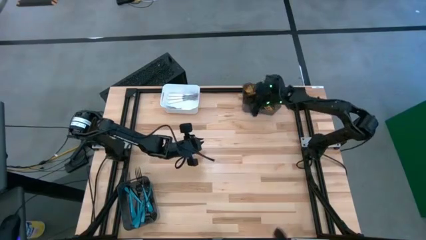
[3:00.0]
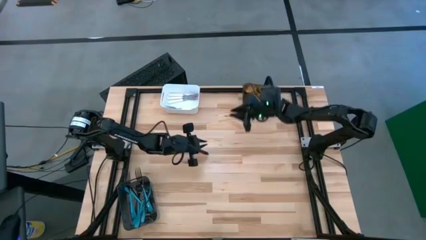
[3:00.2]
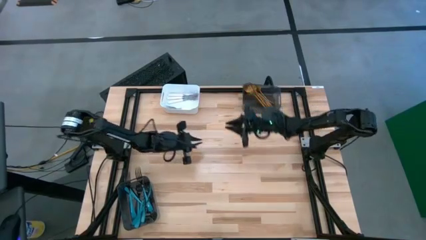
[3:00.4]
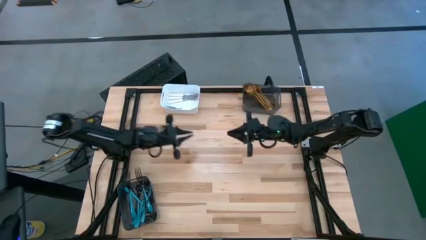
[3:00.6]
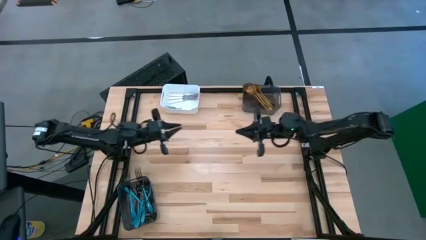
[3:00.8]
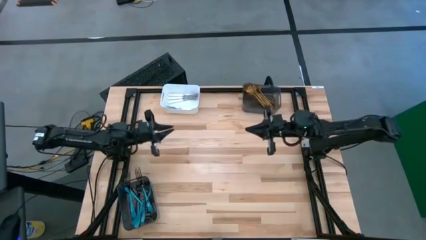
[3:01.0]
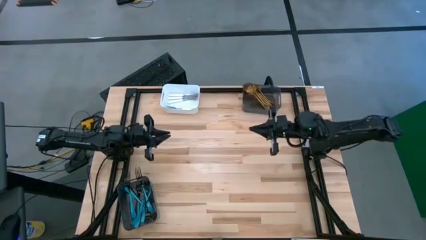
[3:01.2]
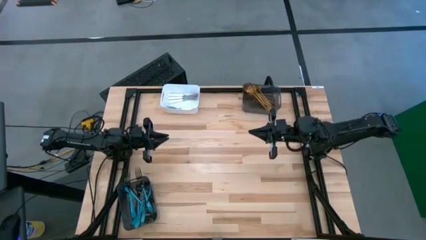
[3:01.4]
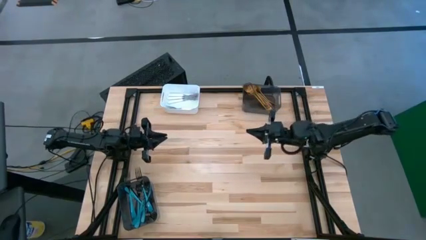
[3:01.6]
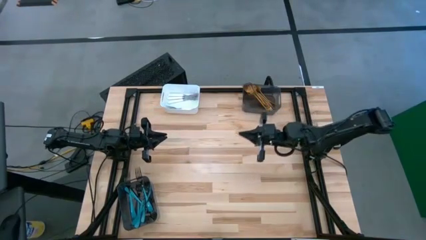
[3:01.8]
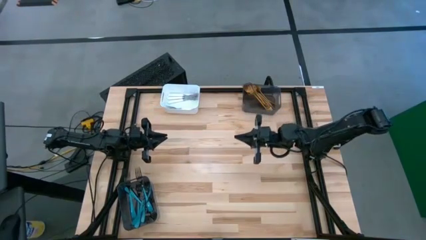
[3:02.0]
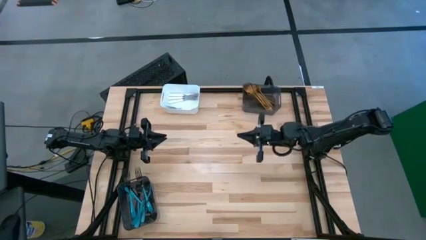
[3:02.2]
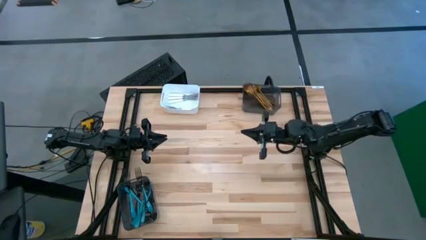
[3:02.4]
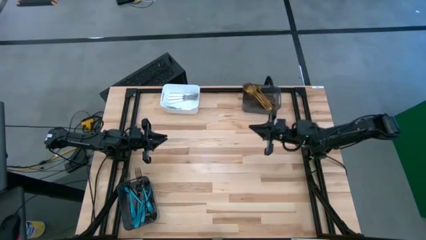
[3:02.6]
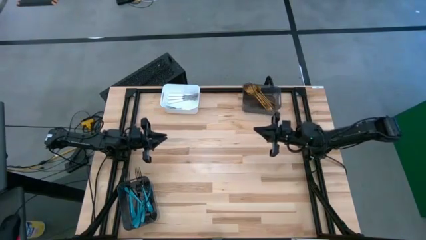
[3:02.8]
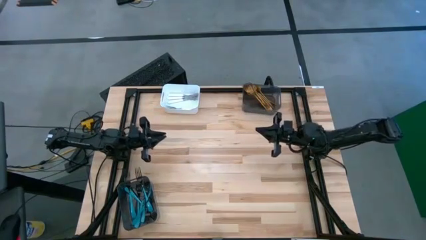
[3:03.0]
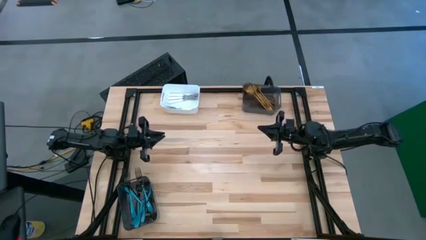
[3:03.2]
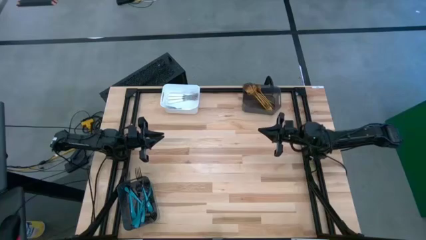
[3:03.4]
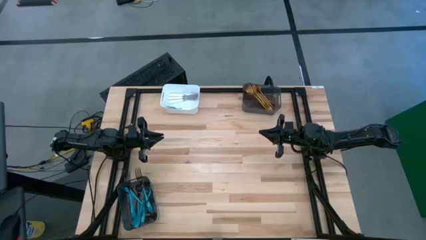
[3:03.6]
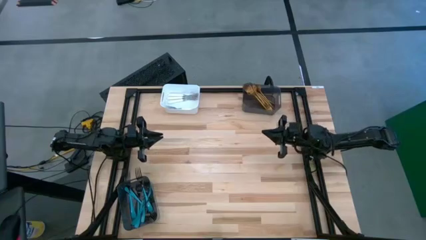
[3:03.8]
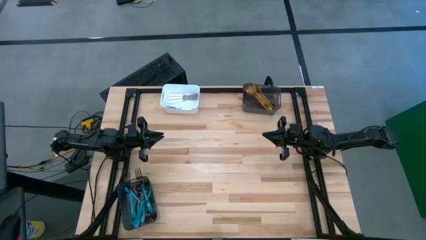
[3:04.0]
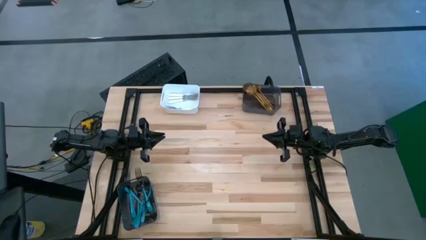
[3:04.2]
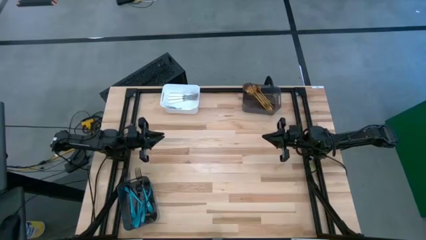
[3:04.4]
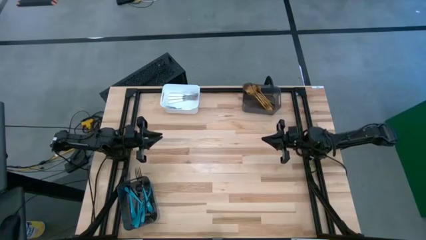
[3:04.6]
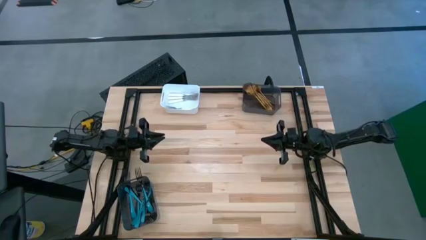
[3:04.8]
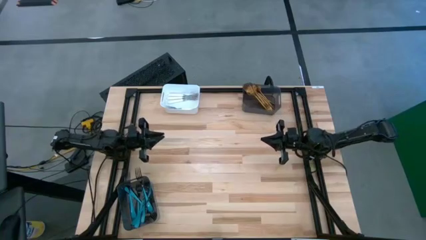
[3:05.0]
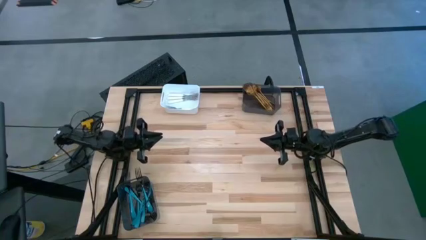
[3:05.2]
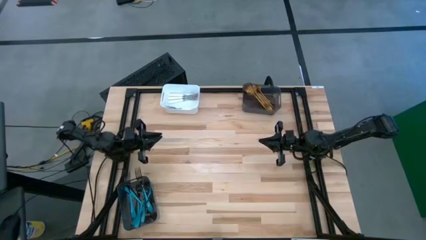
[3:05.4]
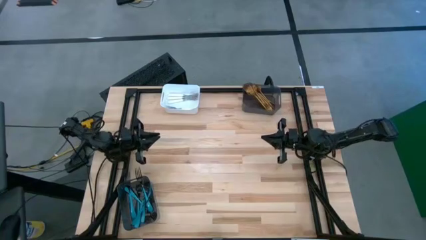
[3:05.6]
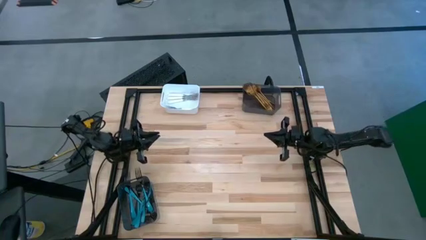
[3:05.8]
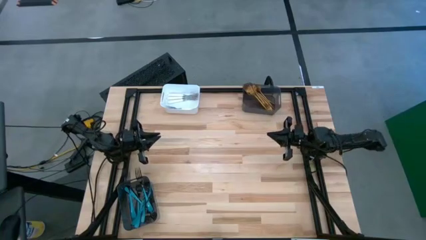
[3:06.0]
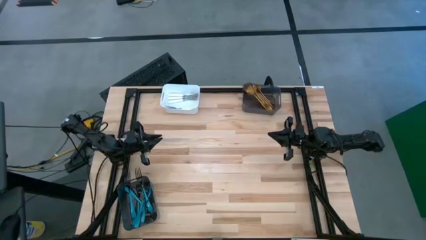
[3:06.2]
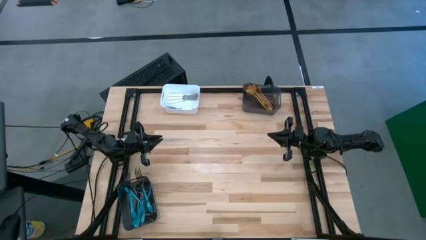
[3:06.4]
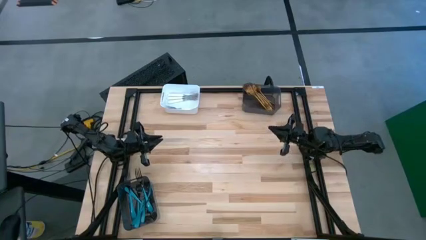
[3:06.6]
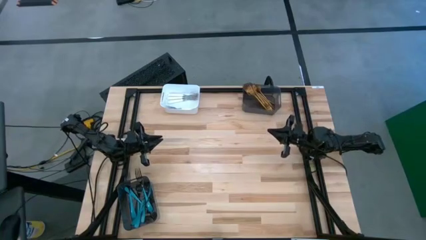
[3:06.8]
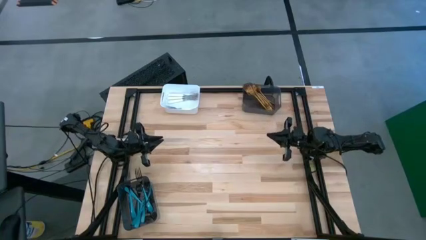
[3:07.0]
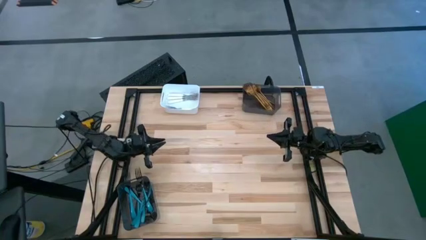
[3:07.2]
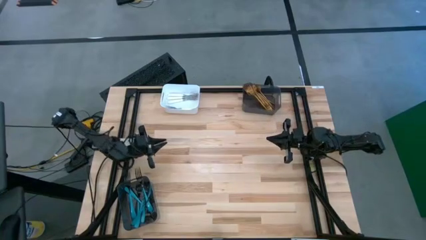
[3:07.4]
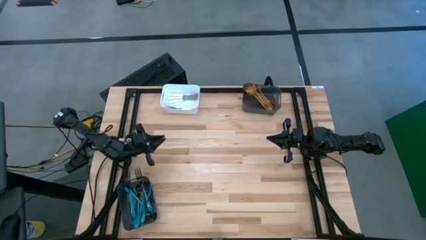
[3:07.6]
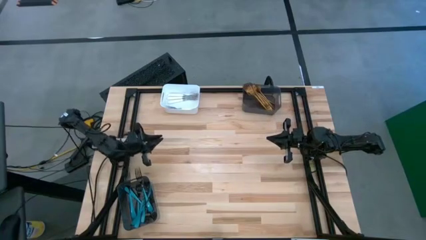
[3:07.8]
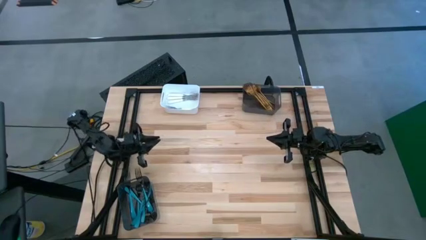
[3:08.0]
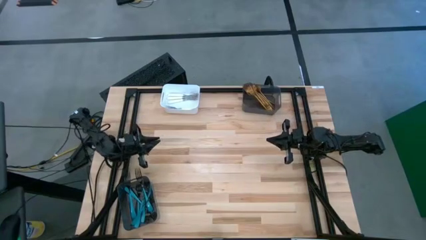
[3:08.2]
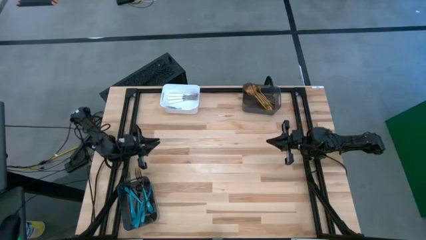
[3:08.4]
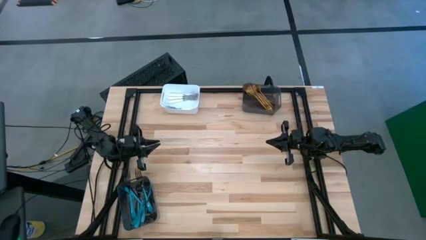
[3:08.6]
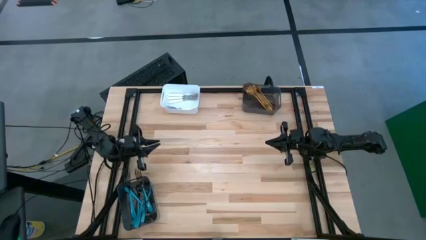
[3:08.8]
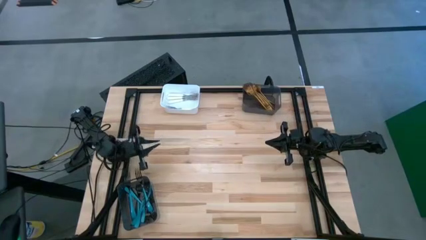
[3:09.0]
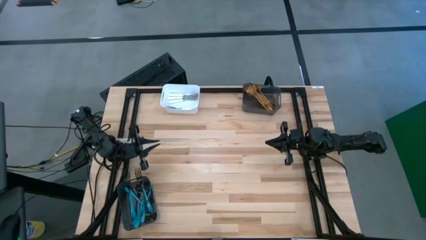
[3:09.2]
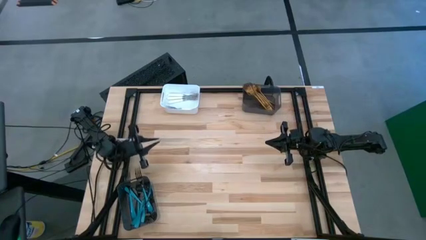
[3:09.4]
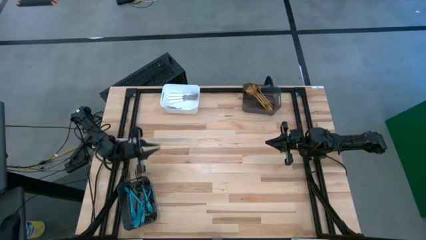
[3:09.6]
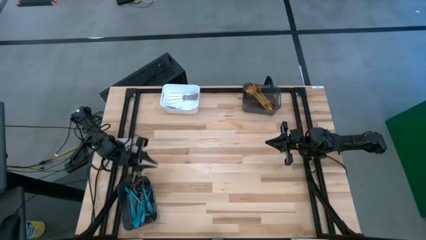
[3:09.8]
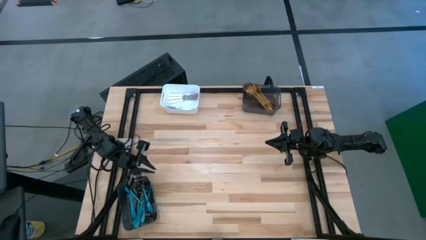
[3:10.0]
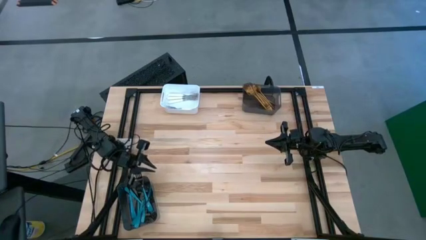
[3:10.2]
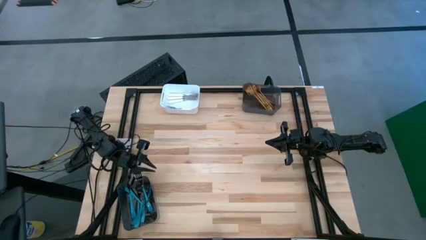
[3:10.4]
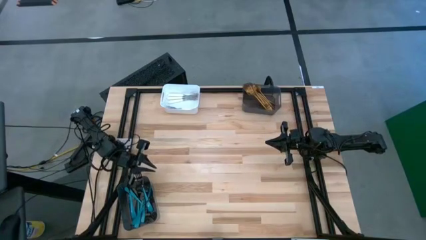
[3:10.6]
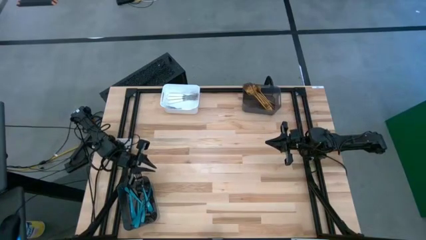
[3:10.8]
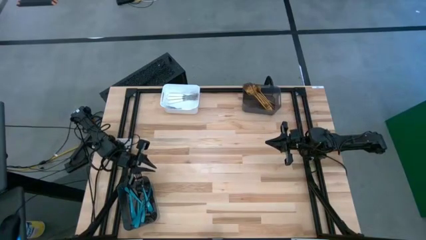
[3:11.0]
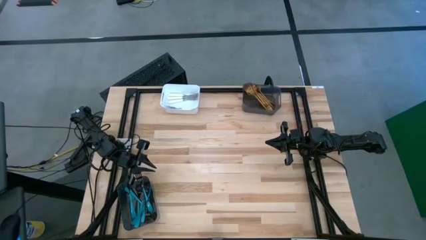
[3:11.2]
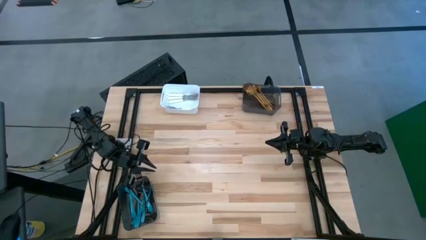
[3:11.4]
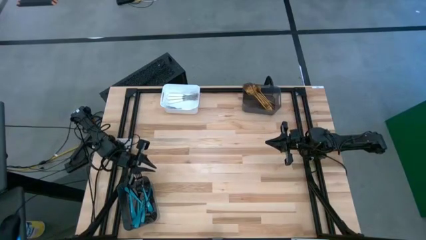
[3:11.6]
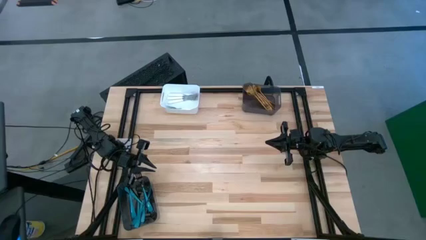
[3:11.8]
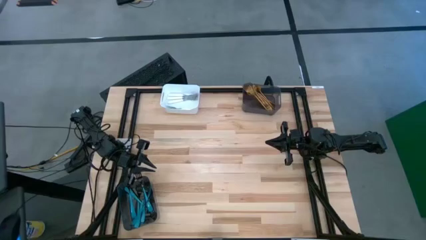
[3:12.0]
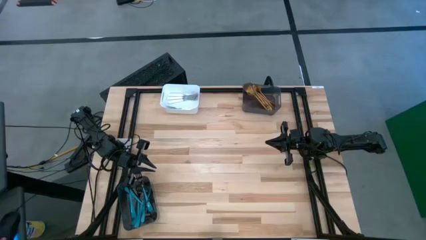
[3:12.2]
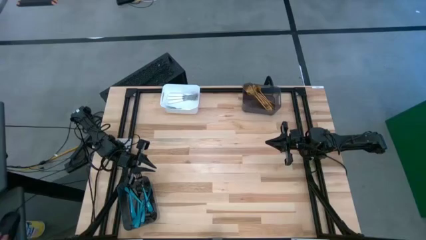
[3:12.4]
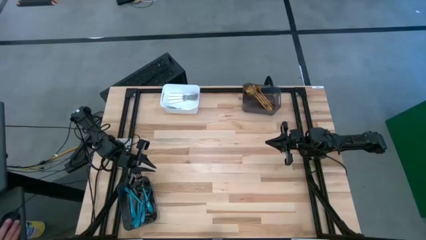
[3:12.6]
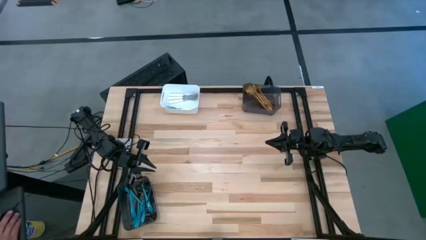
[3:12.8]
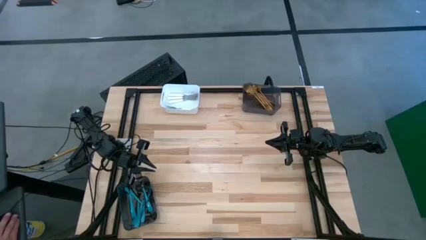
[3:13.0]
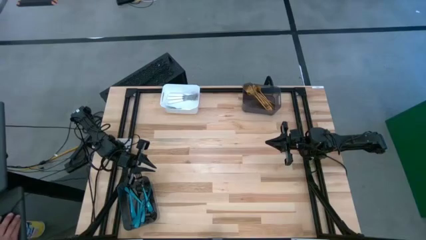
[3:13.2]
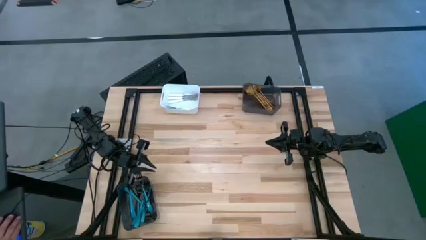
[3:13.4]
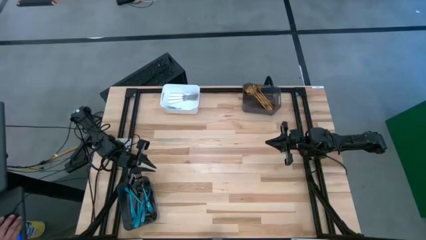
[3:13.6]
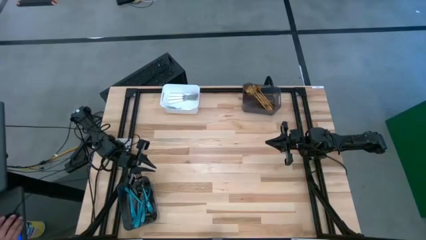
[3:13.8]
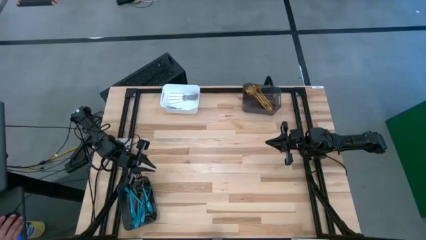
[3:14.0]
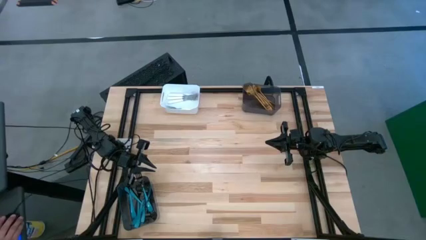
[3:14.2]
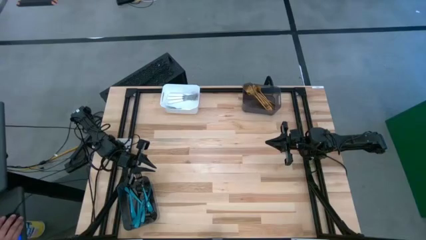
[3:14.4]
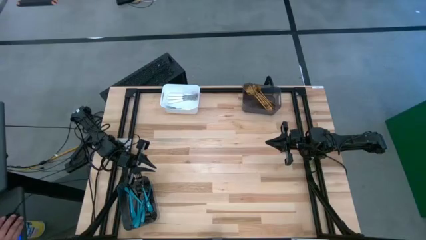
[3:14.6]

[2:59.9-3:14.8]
Task: Sort silverware by color (type)
Return to Home Position

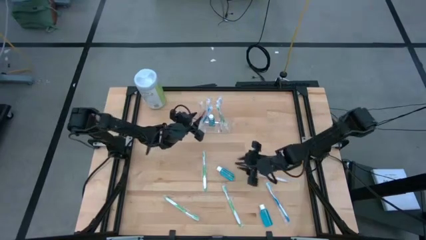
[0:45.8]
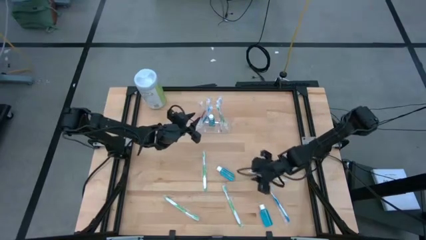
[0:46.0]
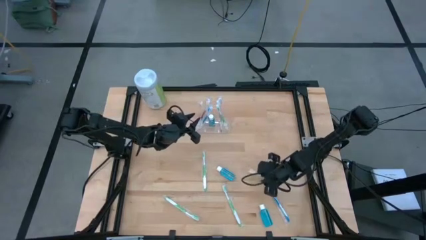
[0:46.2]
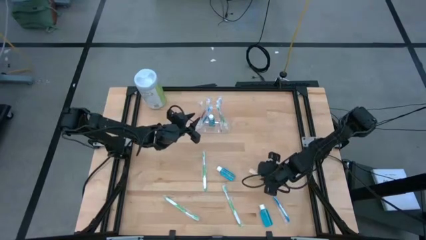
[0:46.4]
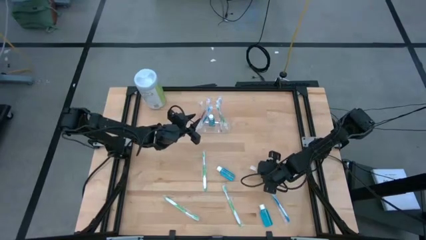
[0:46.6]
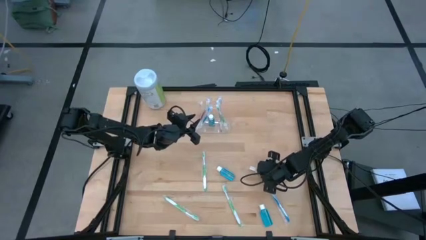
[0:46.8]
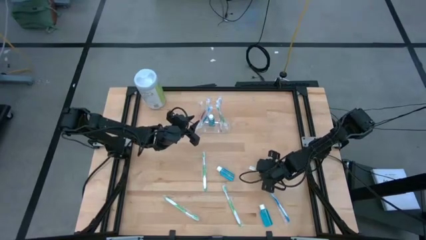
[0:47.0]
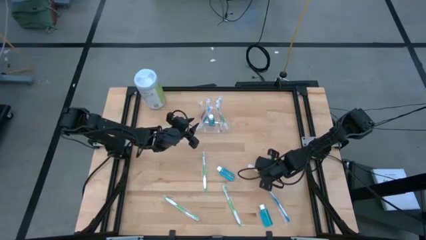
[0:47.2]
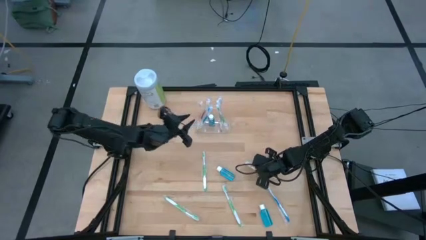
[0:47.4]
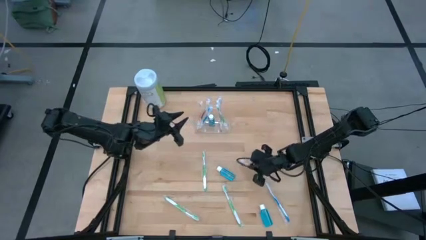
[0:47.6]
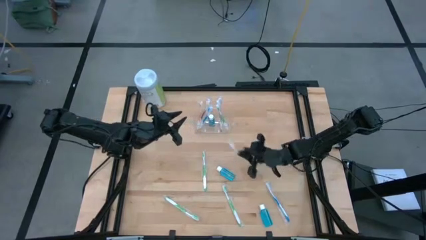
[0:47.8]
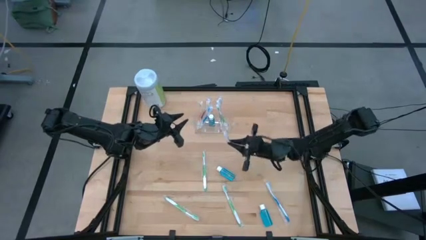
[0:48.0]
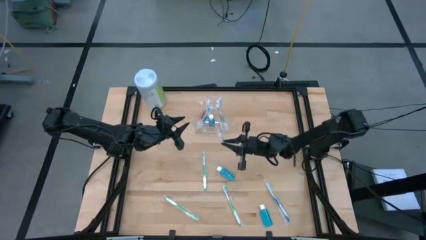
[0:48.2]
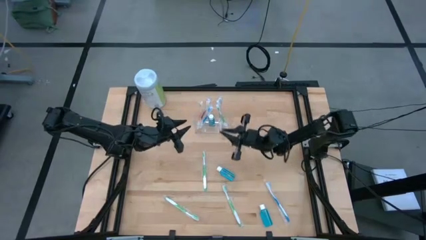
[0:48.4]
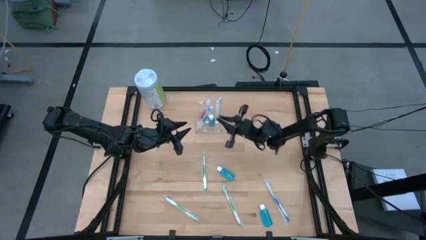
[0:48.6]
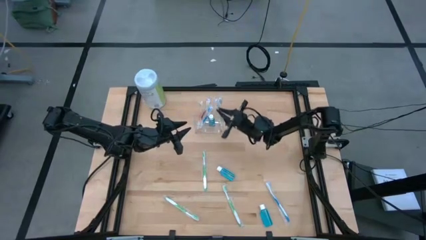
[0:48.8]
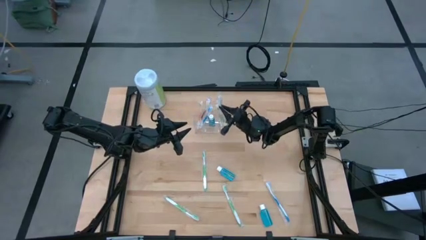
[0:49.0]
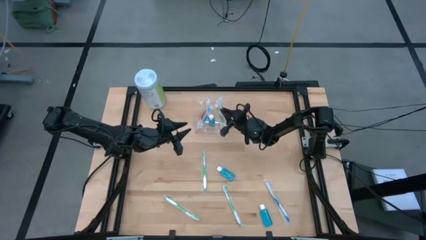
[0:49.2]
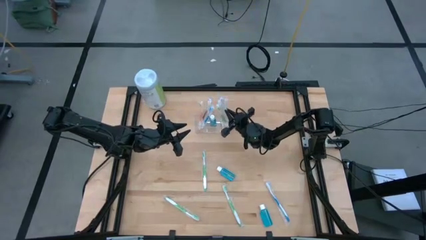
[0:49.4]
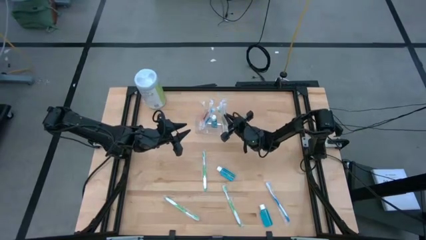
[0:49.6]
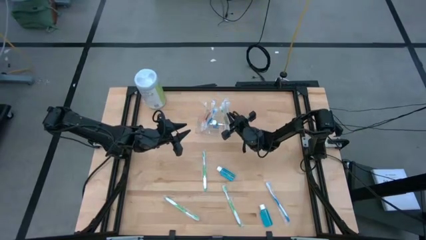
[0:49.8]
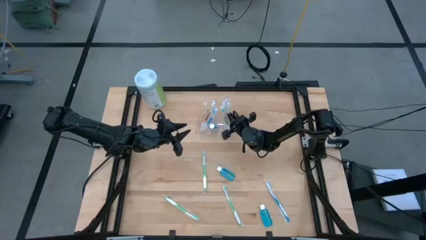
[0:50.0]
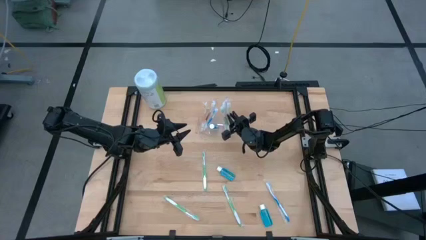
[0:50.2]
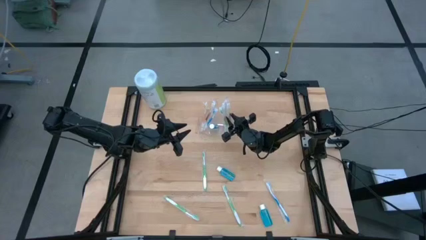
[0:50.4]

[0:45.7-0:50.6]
Task: Pick & Place toothbrushing station
Put the orange toothbrush to the right of the transparent organizer
